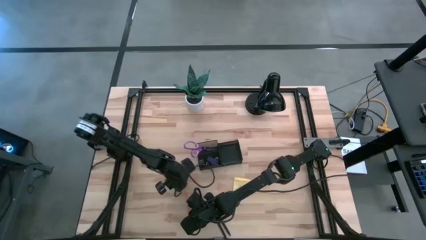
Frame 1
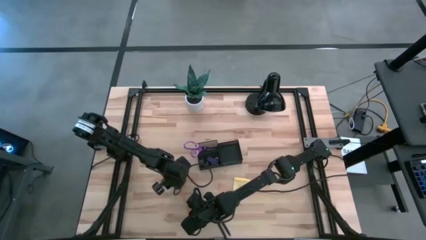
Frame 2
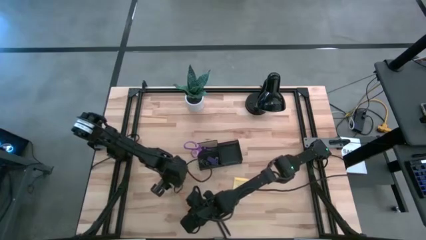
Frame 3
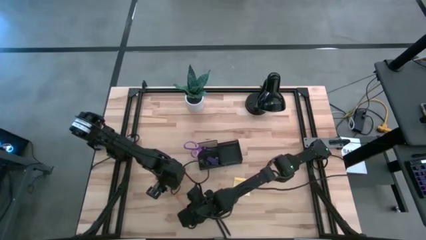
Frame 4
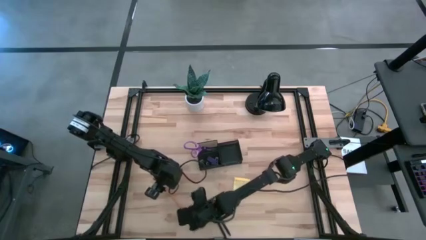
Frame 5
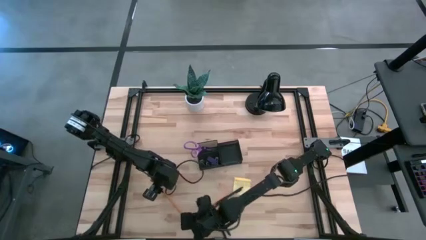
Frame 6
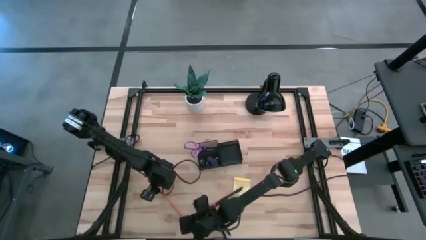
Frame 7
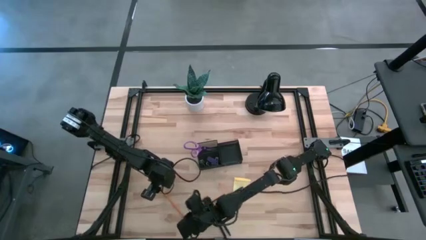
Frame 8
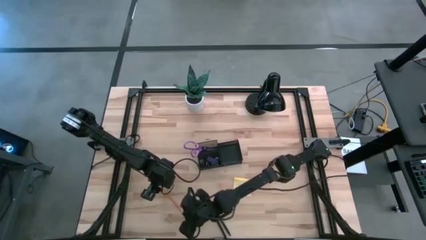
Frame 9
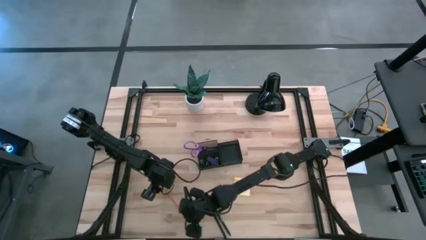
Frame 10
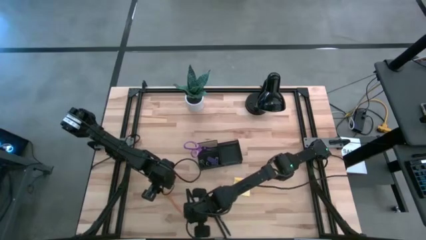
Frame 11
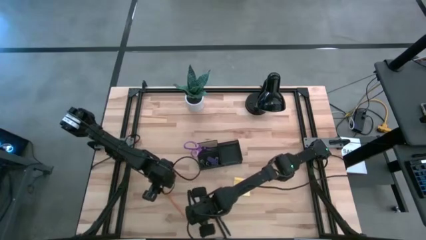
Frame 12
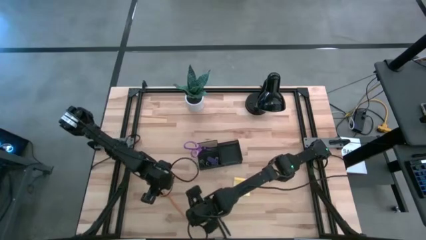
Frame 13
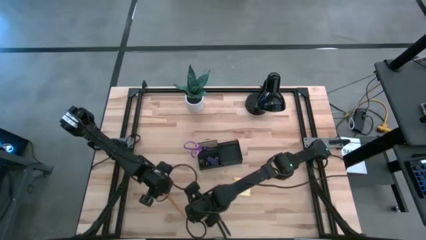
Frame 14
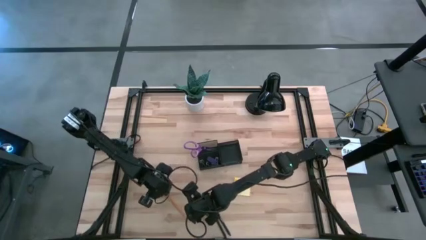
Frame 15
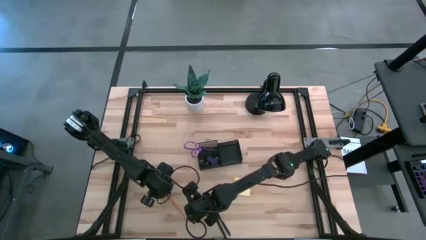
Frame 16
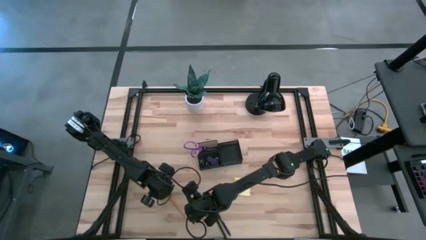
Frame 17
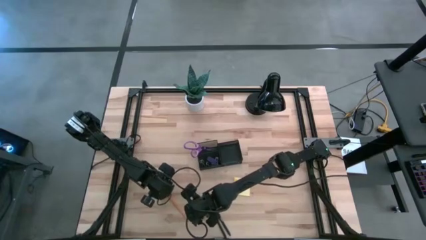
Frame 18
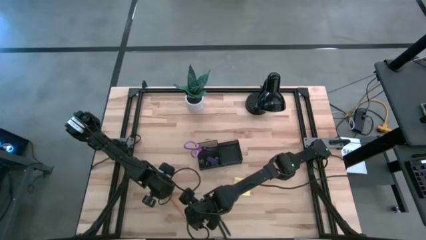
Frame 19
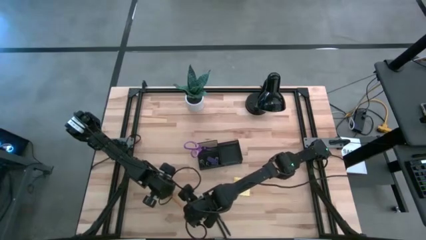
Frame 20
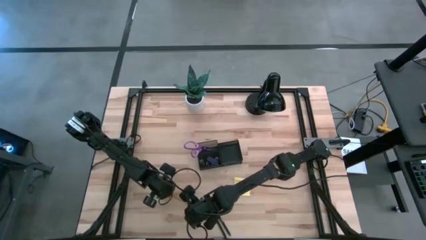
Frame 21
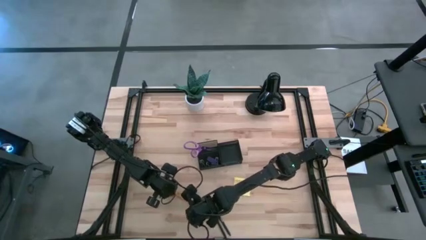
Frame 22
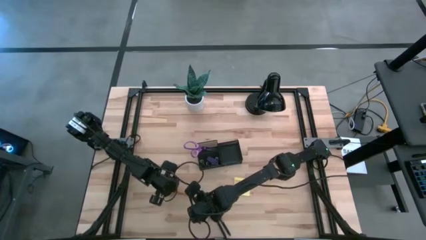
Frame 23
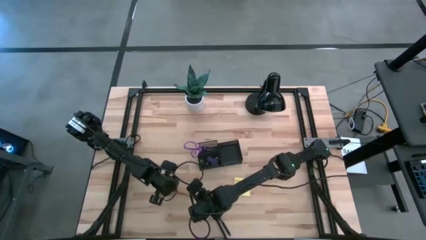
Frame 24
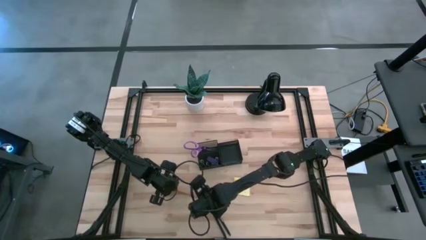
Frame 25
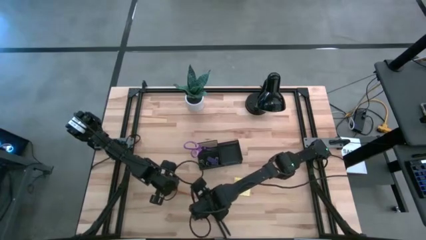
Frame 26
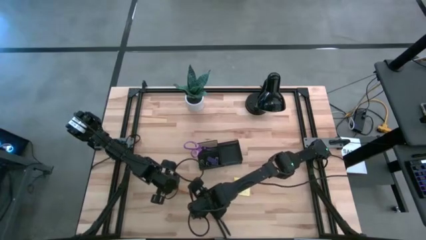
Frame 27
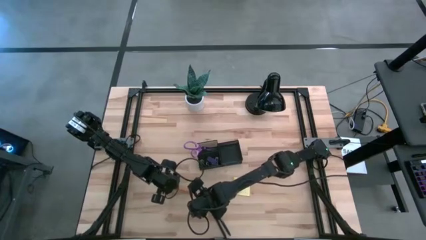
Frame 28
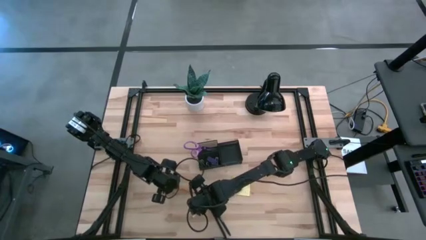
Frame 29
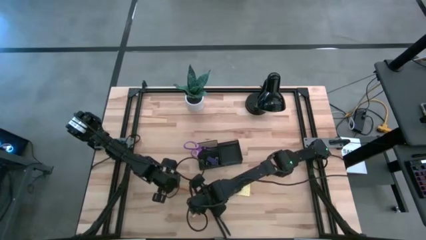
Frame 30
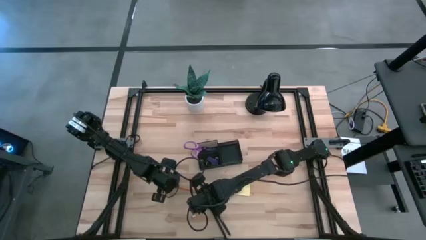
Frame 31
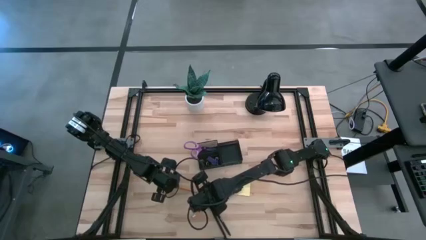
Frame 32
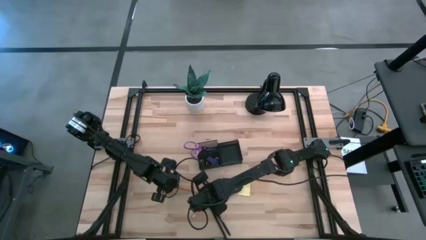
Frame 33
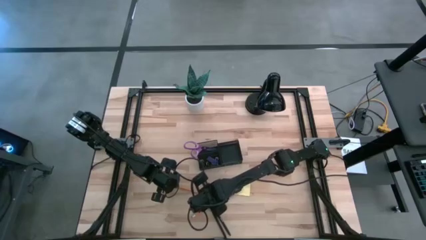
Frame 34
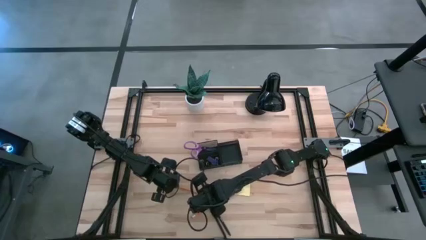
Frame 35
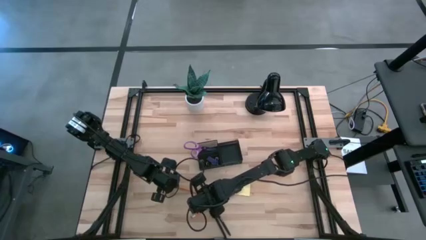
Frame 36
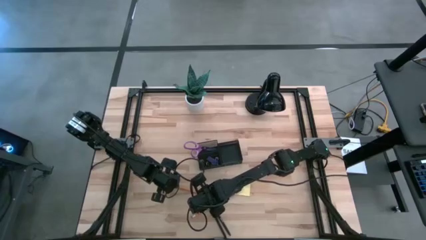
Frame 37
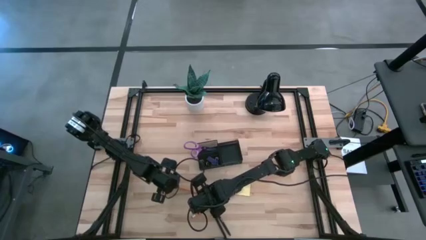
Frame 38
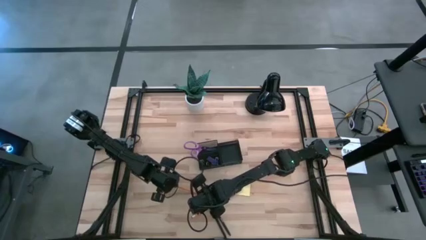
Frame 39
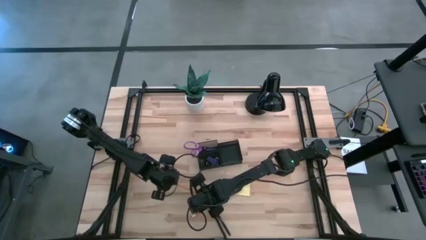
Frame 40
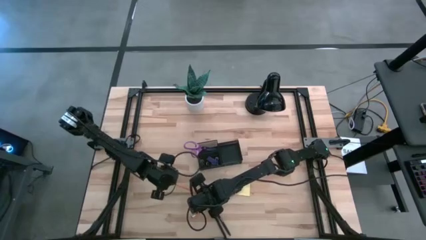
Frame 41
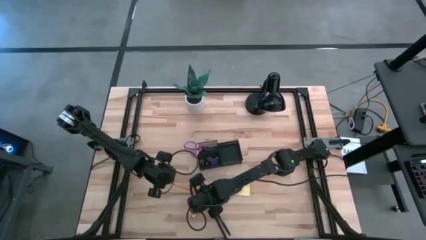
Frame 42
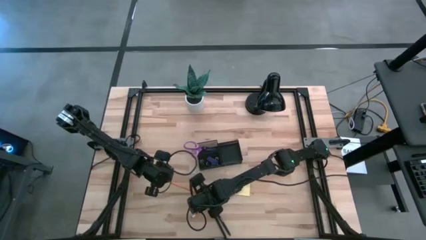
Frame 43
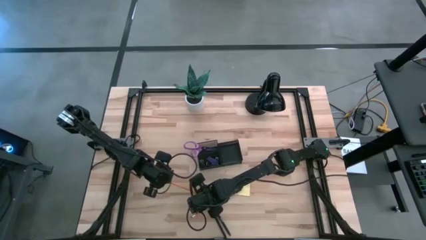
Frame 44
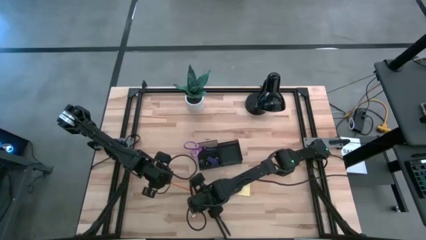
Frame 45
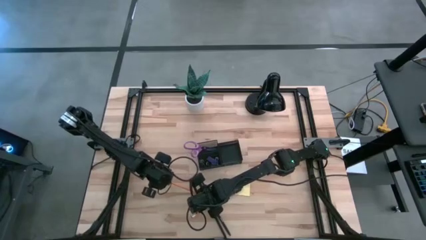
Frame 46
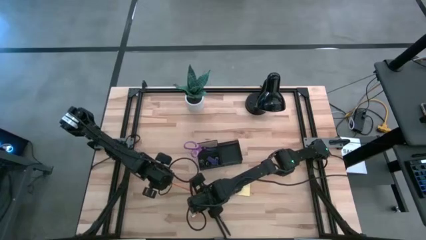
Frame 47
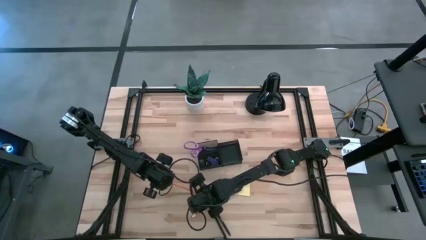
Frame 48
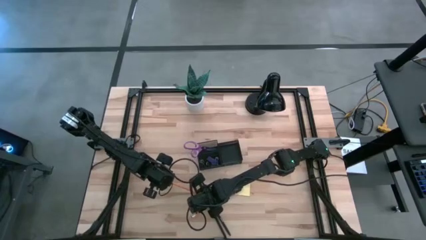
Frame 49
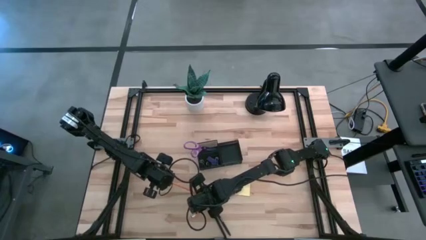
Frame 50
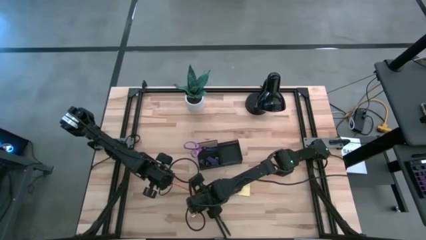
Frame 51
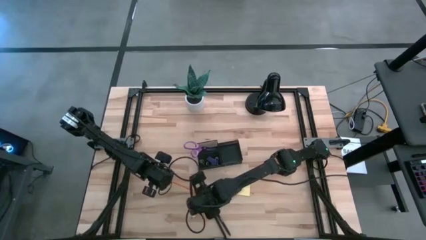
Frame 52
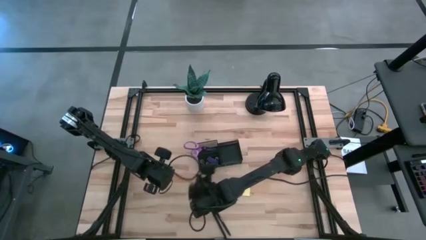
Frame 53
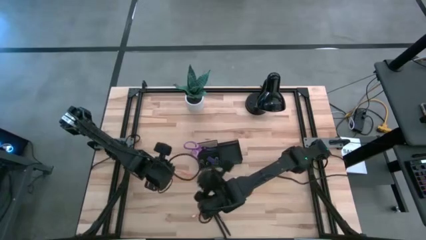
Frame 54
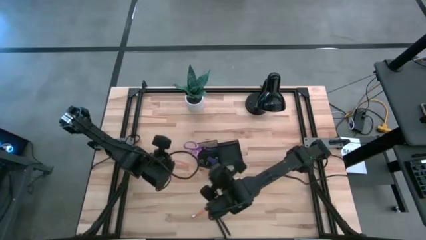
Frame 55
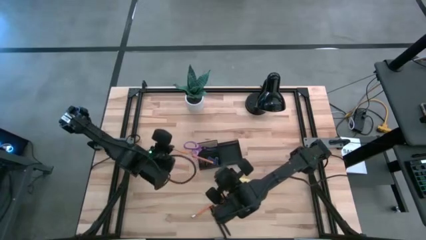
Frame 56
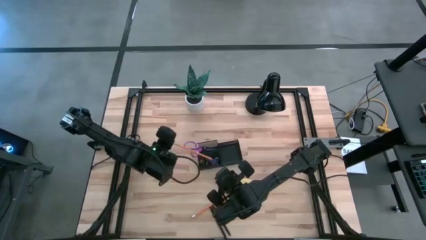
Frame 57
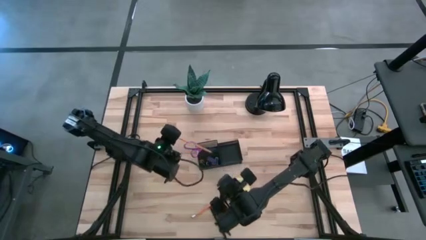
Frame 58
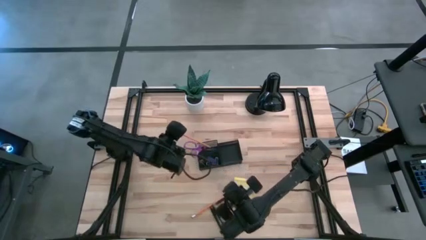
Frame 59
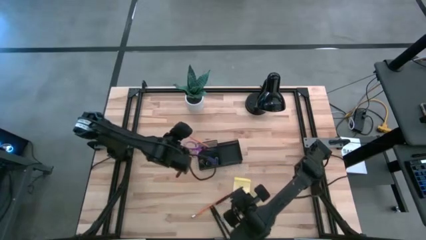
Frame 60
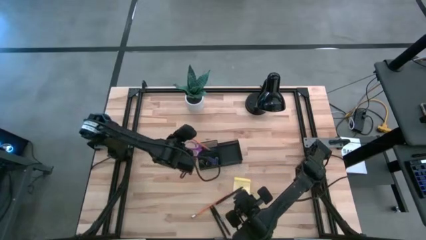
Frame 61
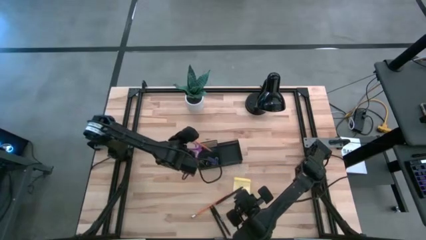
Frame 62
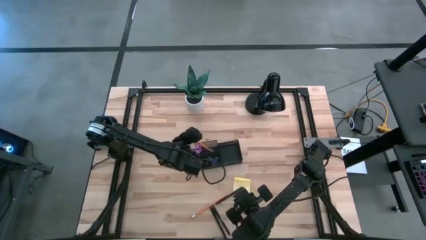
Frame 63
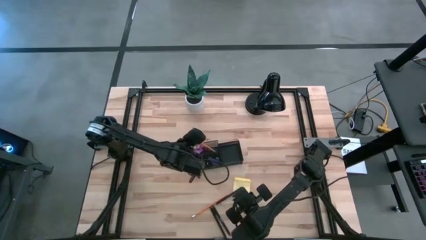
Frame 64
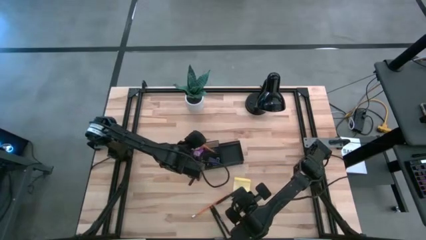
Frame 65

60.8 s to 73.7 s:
Task: Pick and place office supplies into organizer
Put the left pencil into the desk organizer

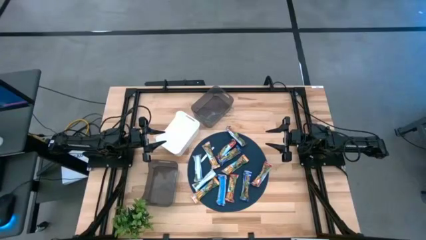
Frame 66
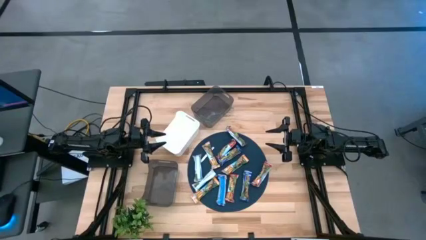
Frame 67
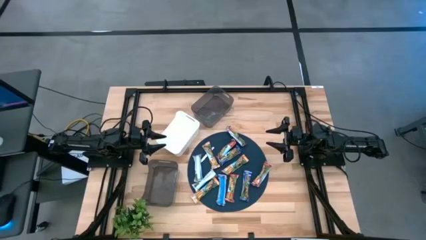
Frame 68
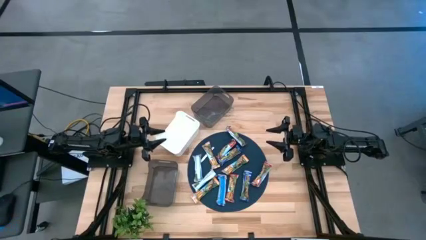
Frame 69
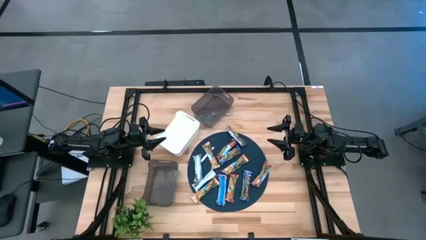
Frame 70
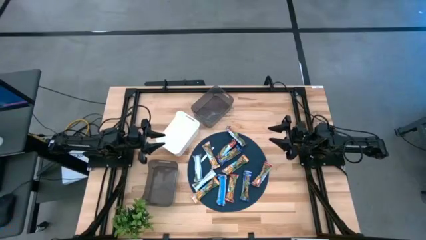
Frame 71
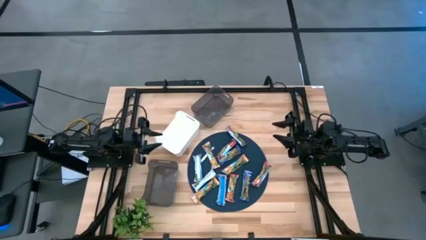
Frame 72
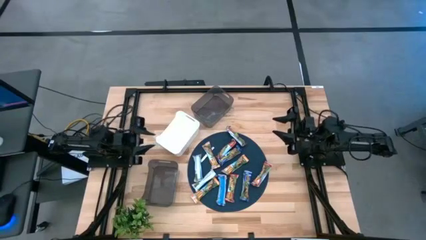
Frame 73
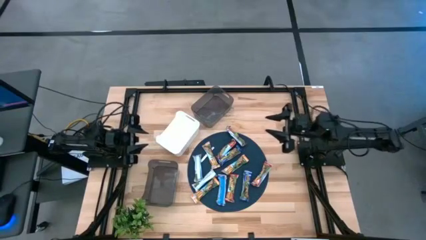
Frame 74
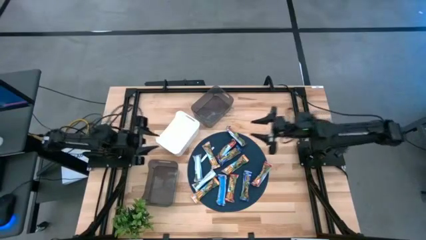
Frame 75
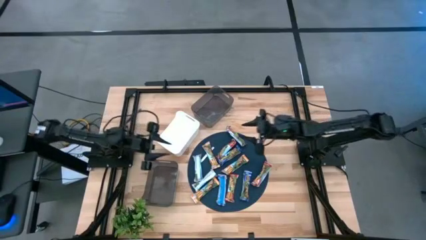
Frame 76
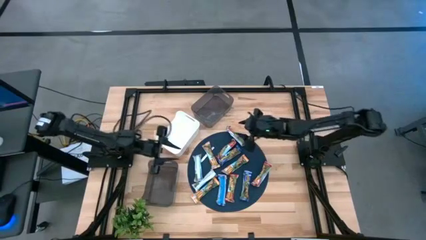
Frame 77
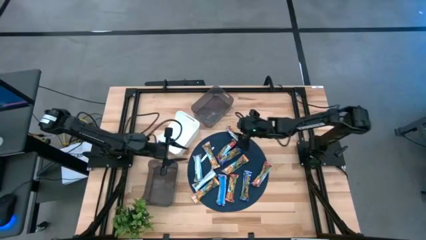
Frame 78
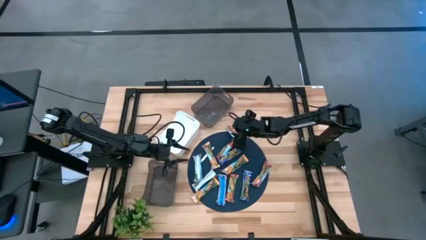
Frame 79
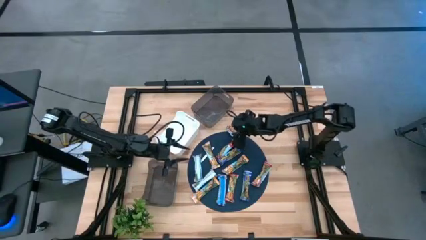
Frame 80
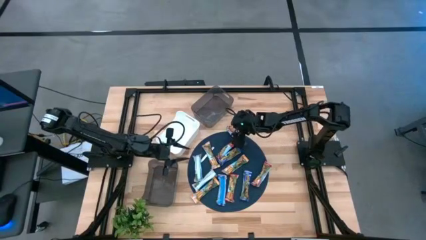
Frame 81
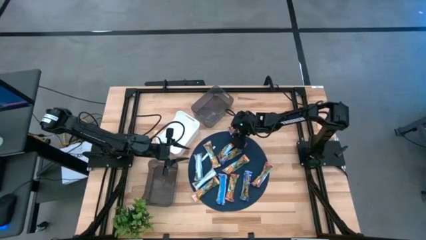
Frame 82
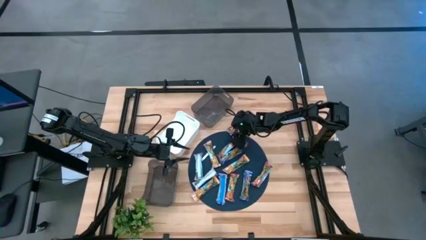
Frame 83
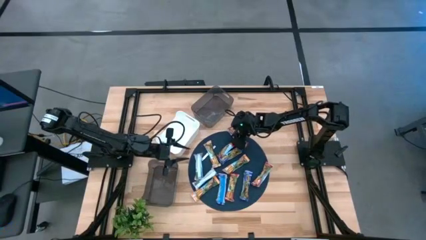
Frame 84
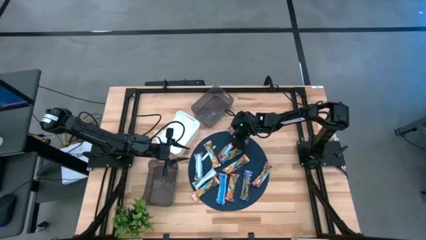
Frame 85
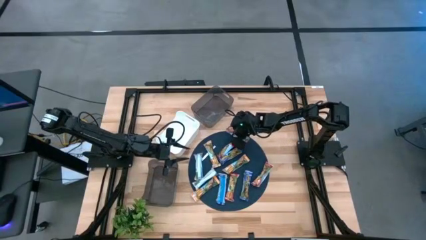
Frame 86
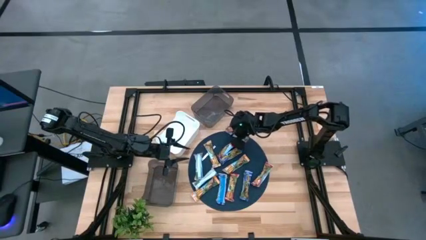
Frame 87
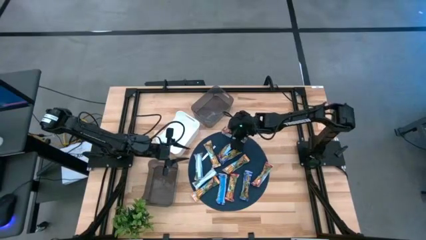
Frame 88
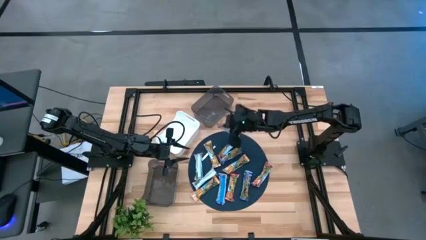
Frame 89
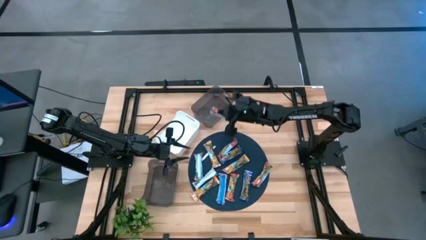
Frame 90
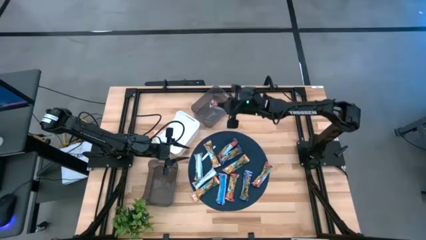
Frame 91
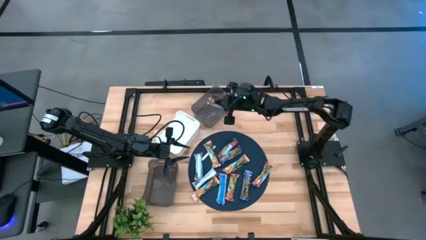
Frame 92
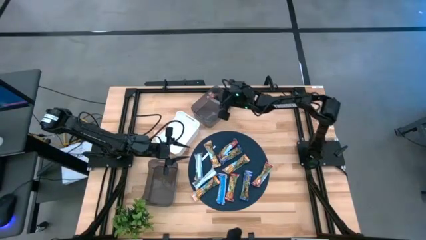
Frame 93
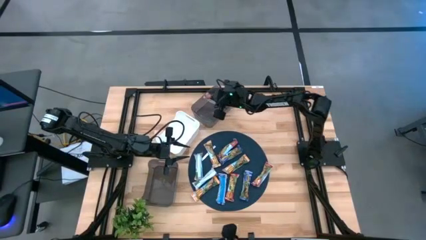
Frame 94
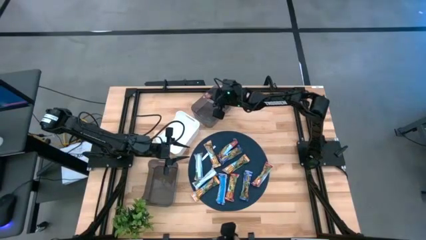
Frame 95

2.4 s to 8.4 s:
Task: Pick and place Granola Bars by type
Put the red granola bar into the top black bin
